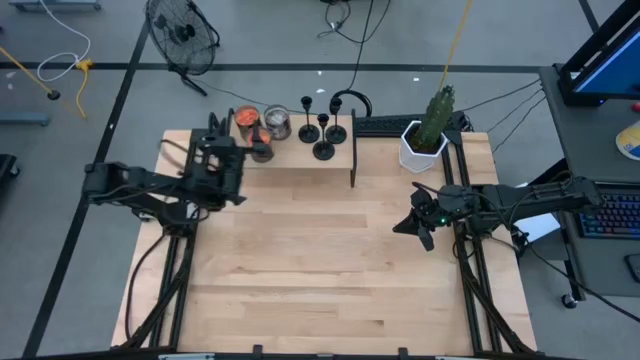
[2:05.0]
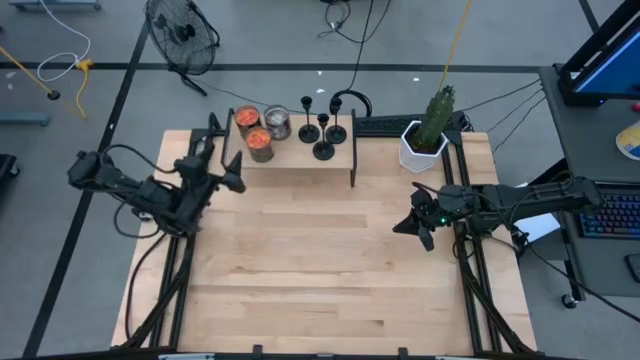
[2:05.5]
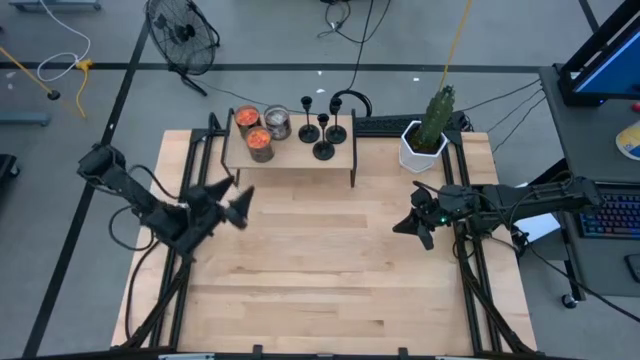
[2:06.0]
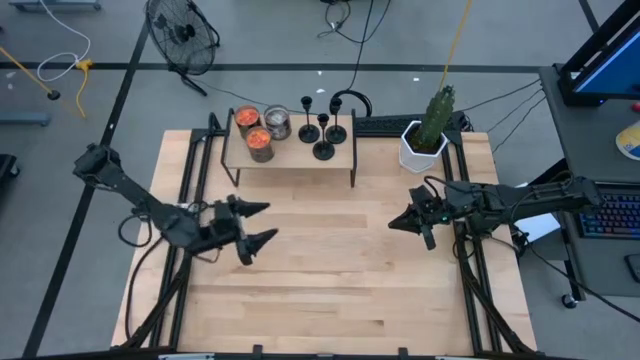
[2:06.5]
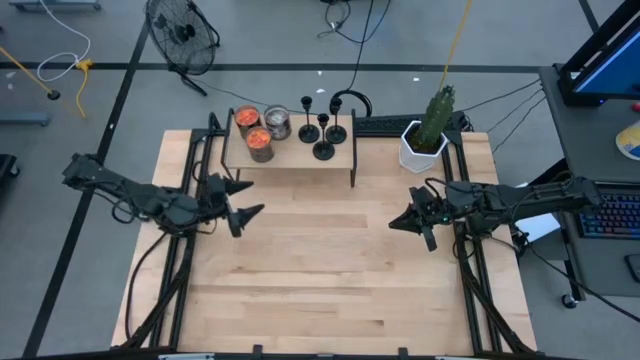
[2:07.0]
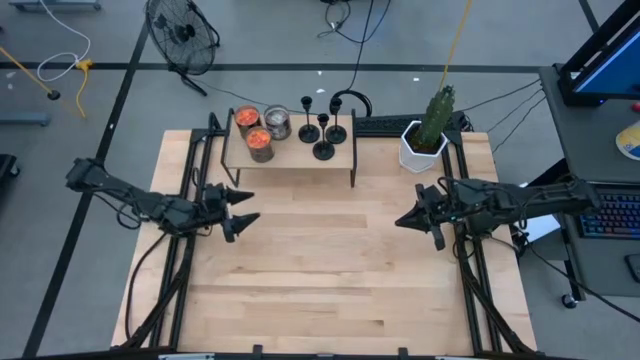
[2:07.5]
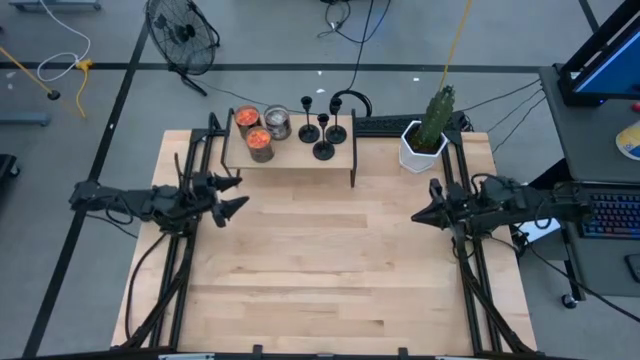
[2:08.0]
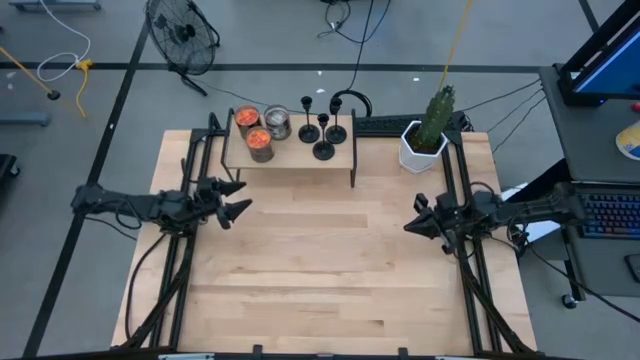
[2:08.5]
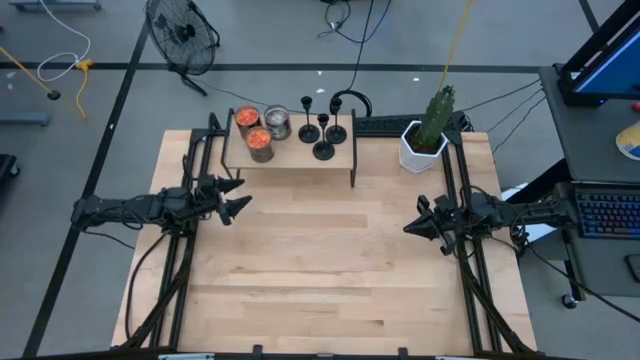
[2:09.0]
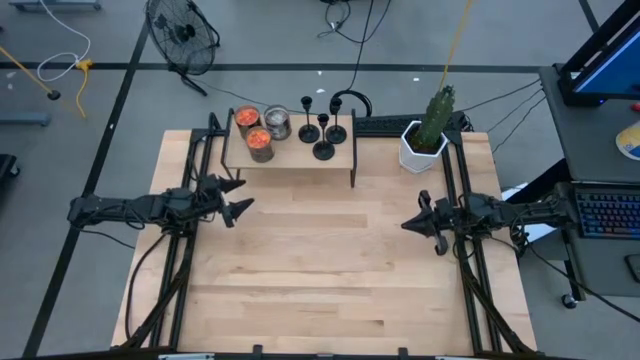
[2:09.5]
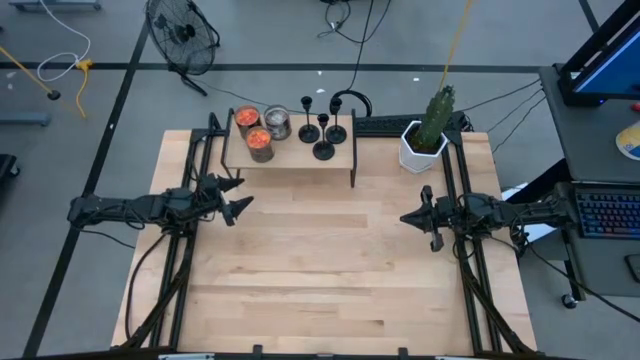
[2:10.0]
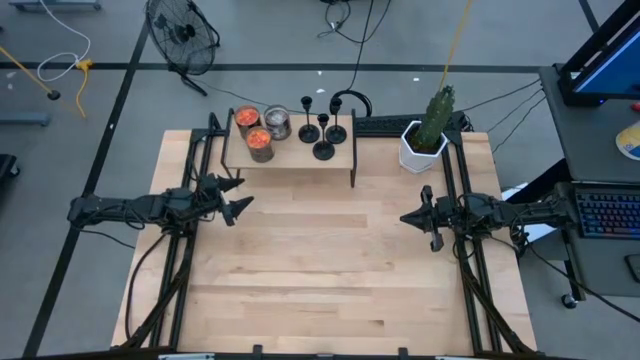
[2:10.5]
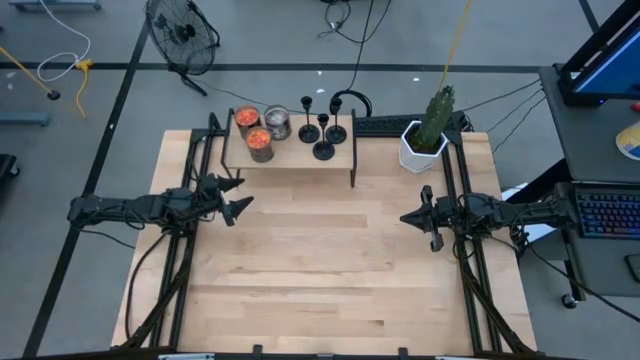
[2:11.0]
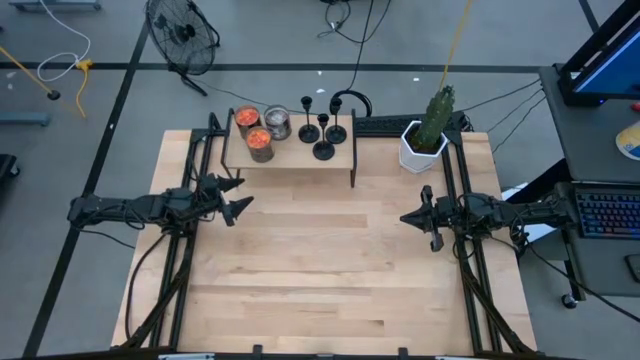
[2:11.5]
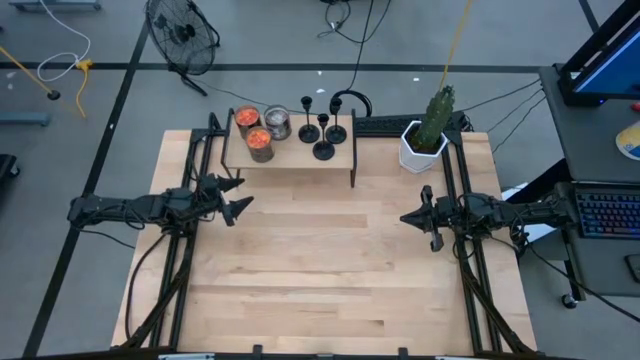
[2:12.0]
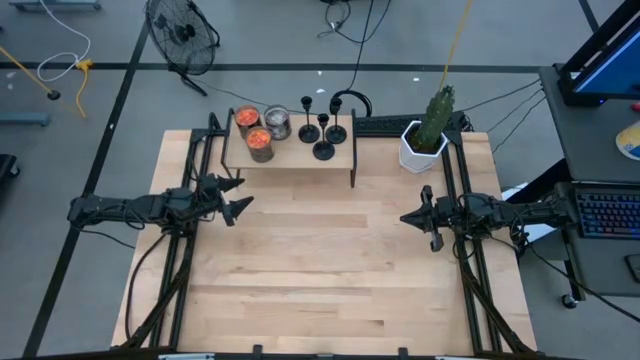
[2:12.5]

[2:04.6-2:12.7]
Task: Pick & Place candle stick holders
Return to Home Position

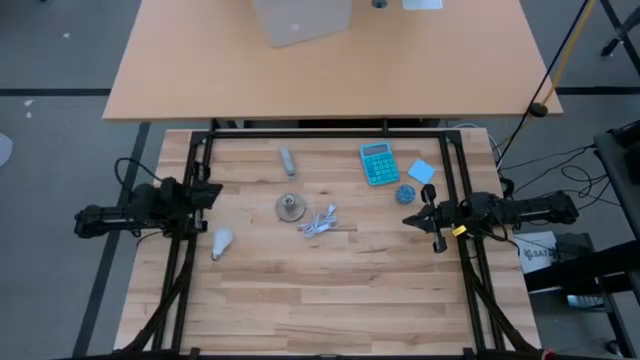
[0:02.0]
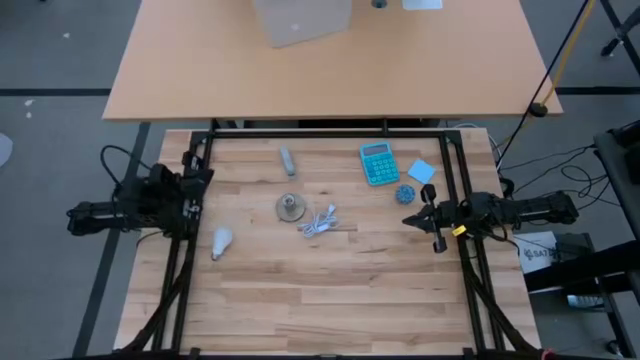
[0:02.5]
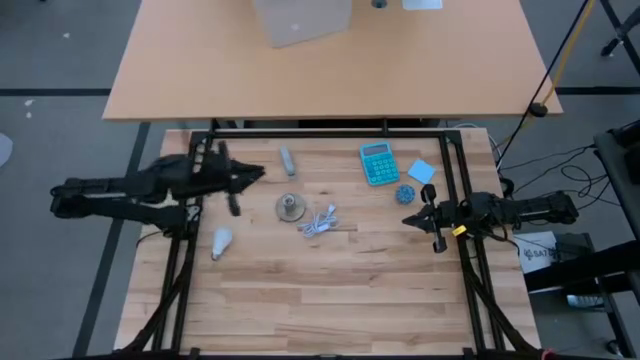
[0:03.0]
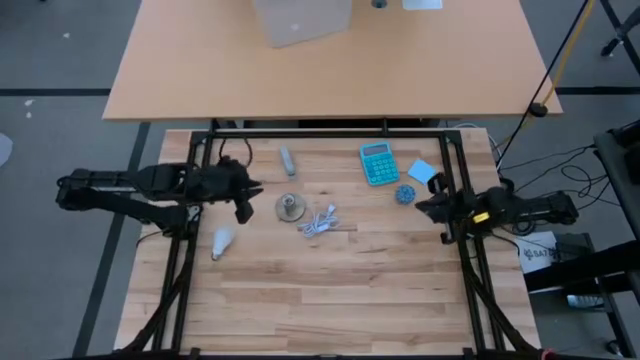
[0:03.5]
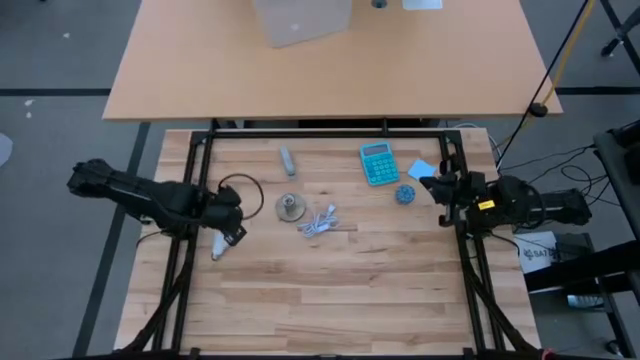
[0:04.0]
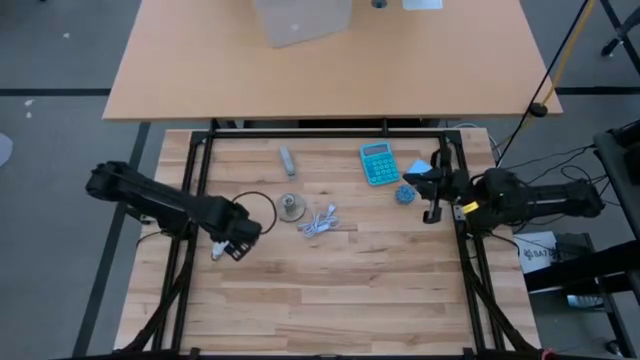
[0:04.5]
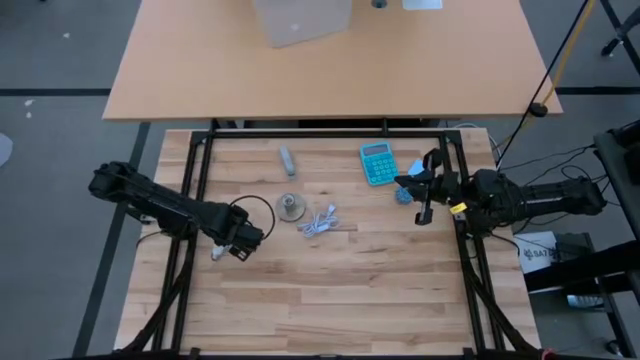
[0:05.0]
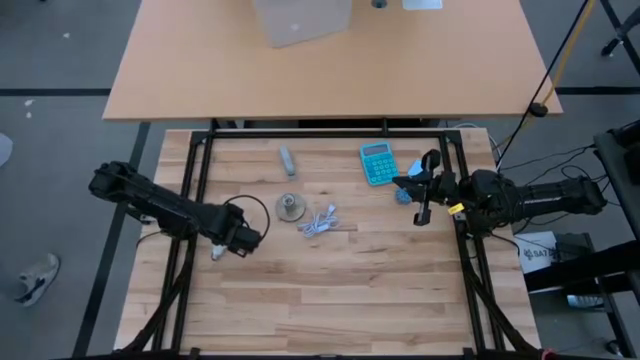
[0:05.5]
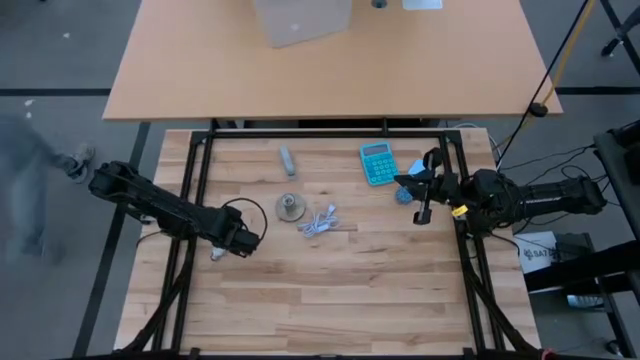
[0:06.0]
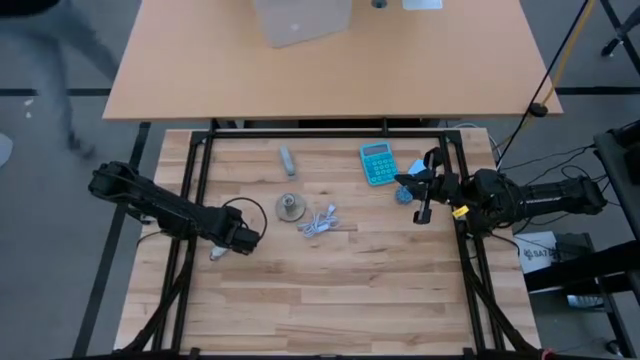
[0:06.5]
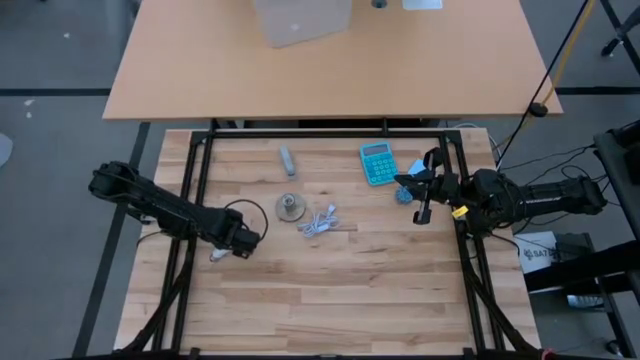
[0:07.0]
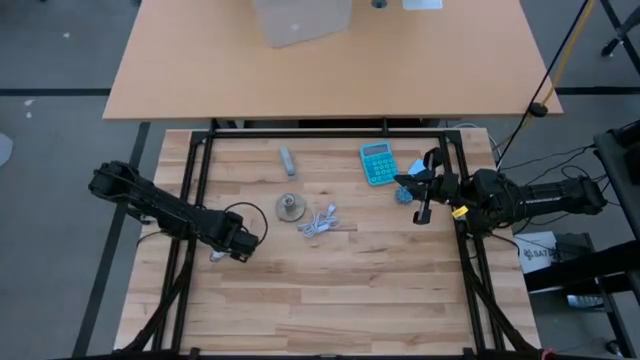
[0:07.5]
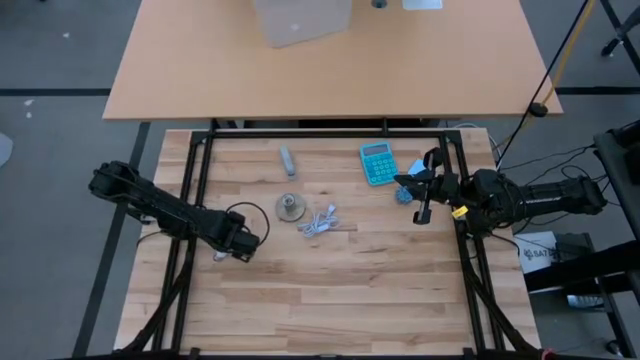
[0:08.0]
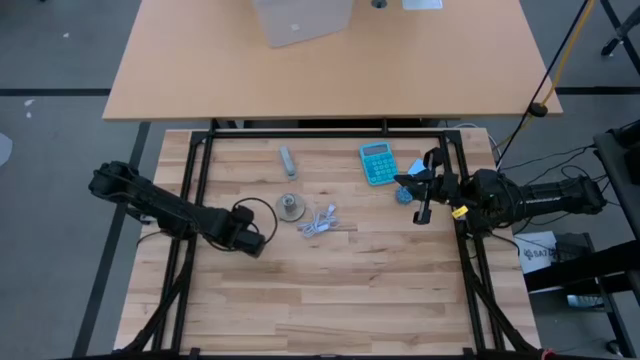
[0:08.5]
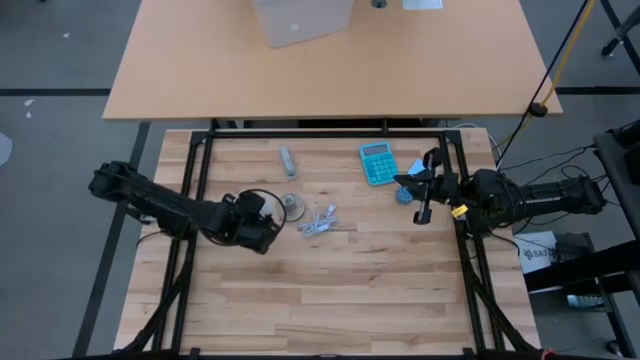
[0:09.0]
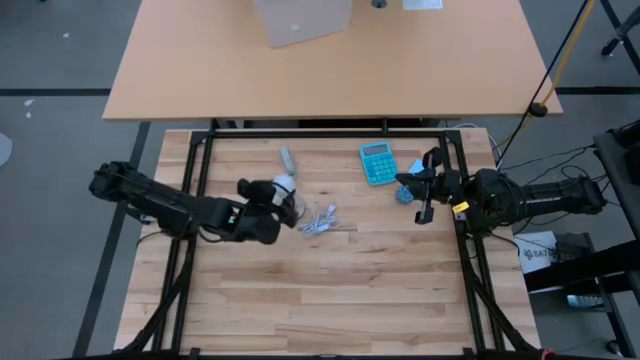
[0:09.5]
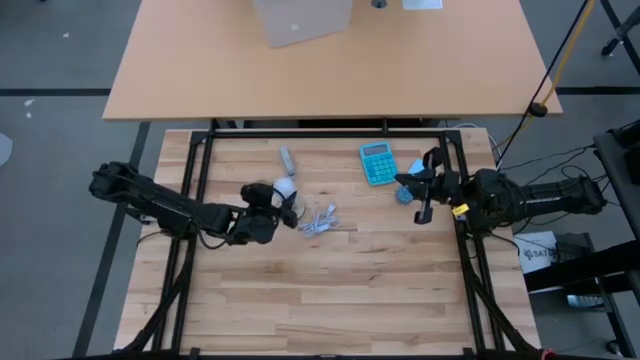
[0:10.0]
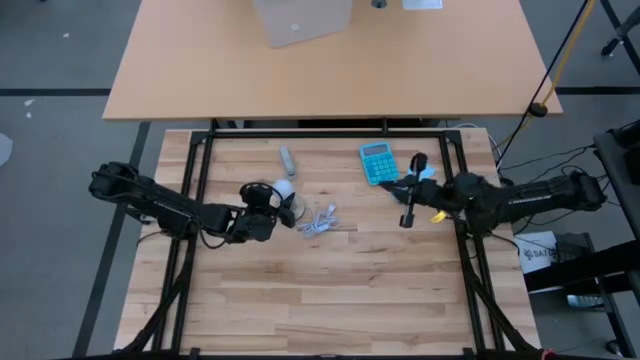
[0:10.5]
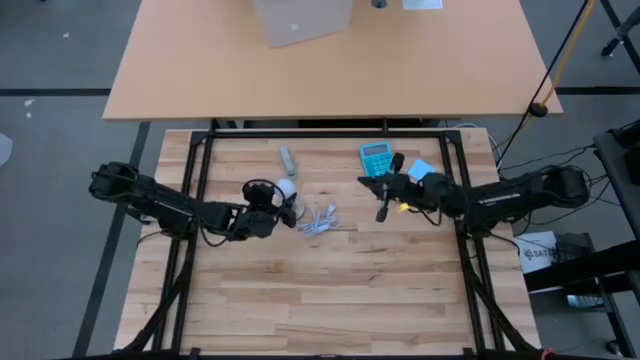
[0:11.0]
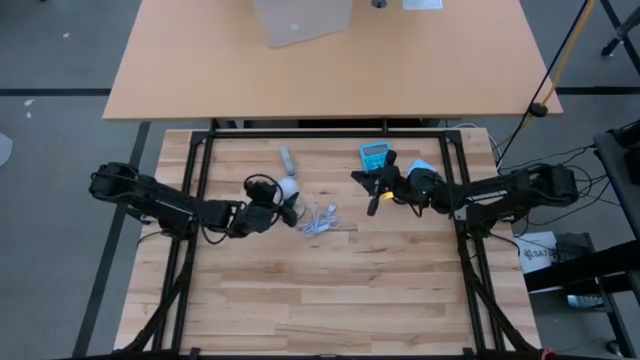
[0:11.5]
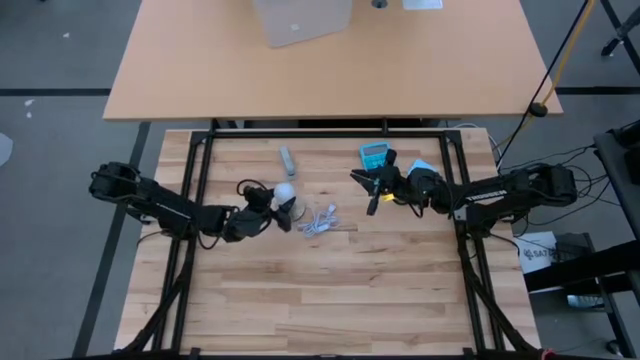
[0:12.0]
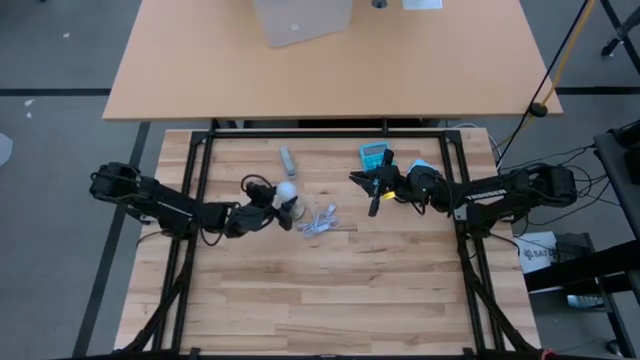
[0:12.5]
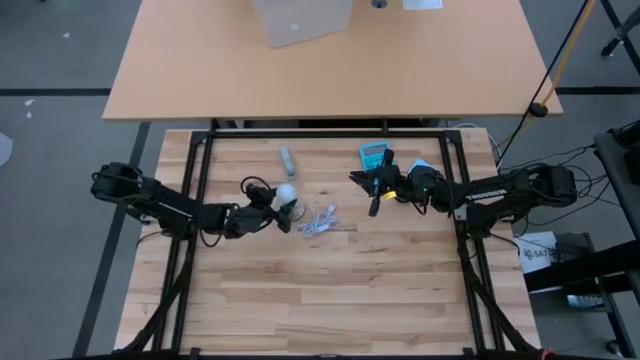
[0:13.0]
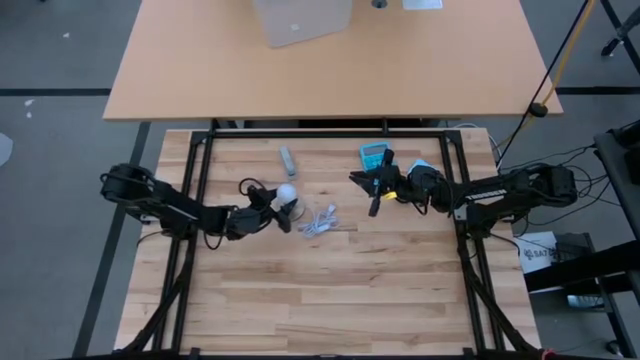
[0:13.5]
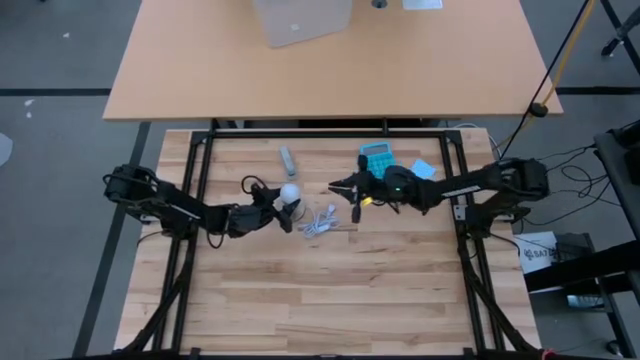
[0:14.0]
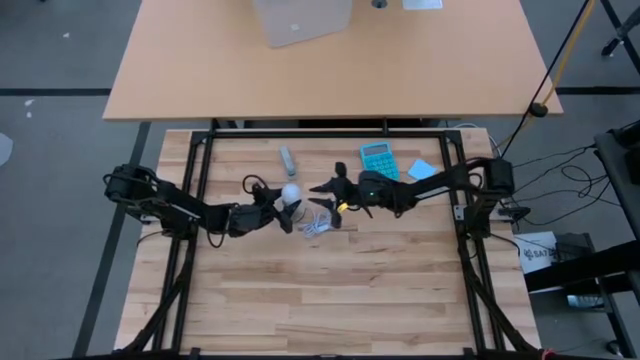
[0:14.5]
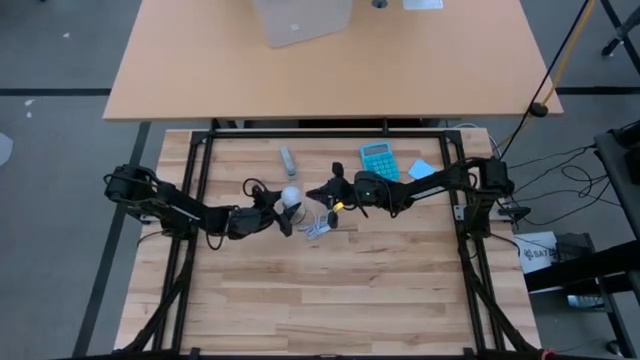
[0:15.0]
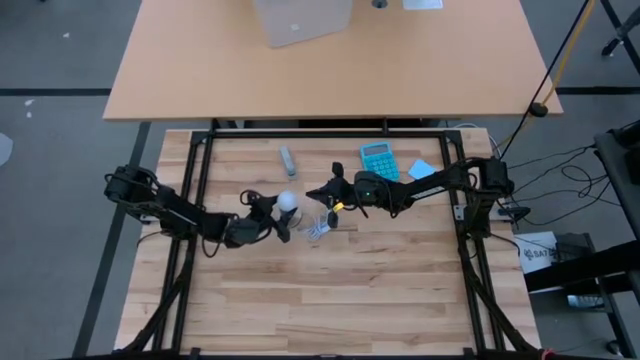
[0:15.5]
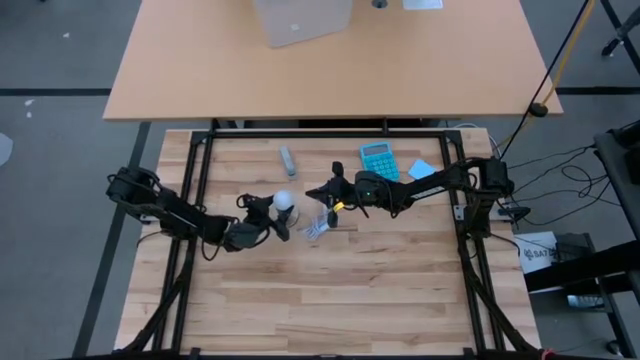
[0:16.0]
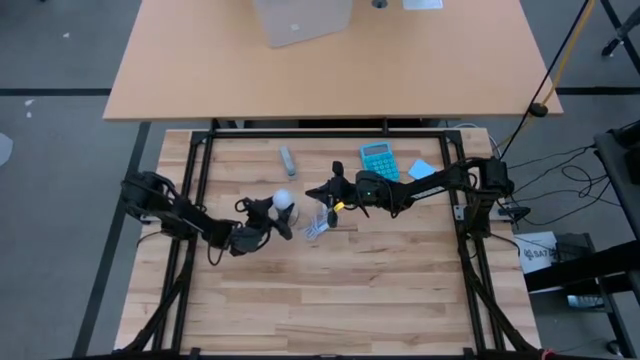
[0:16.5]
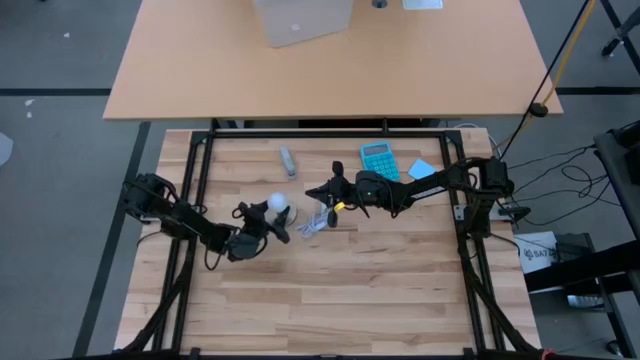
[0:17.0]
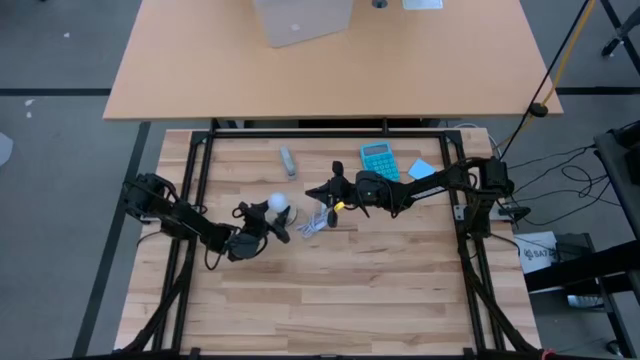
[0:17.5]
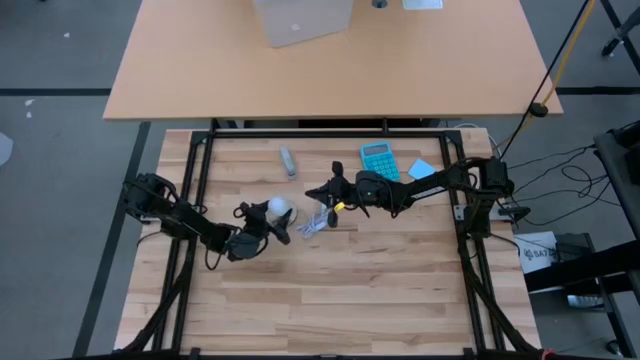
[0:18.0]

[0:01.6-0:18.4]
Task: Screw lightbulb
Insert the white lightbulb into the desk lamp
